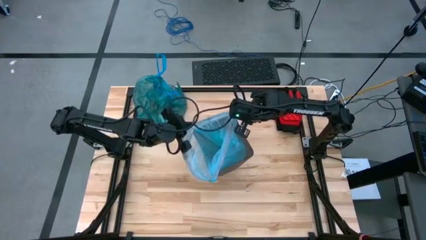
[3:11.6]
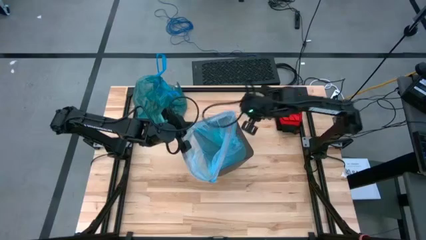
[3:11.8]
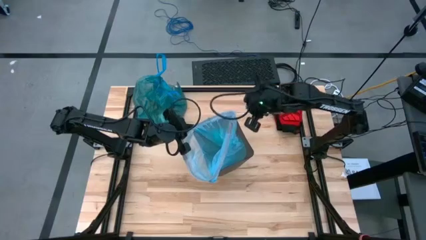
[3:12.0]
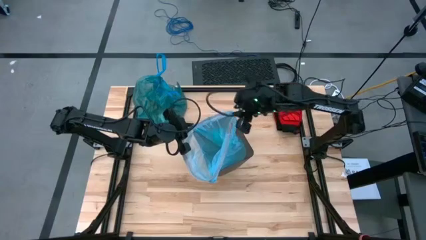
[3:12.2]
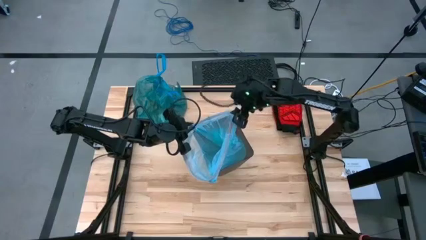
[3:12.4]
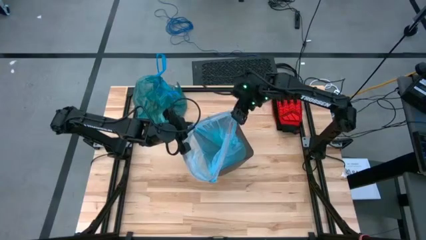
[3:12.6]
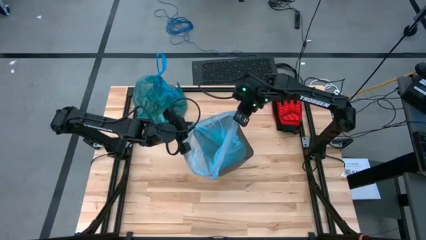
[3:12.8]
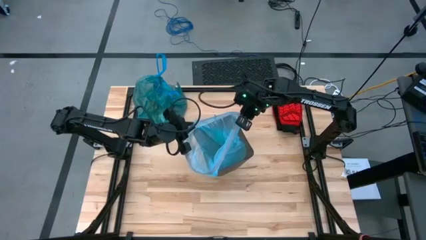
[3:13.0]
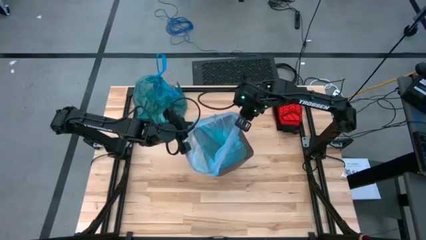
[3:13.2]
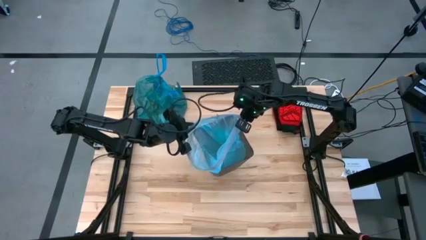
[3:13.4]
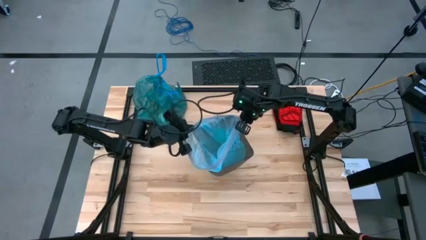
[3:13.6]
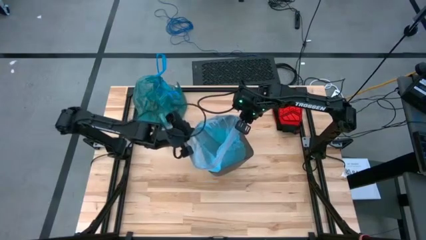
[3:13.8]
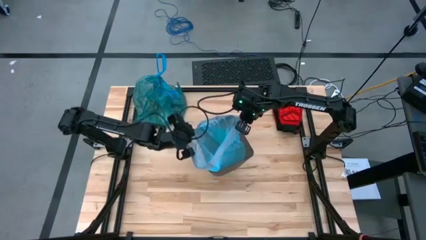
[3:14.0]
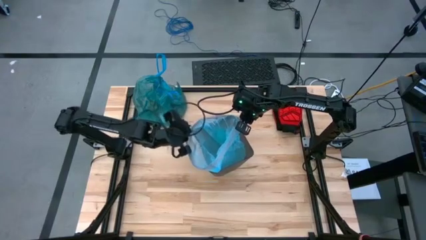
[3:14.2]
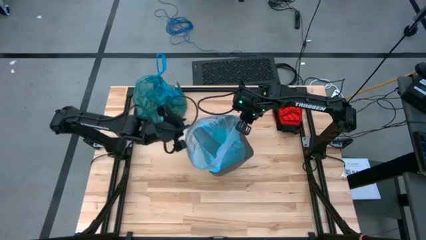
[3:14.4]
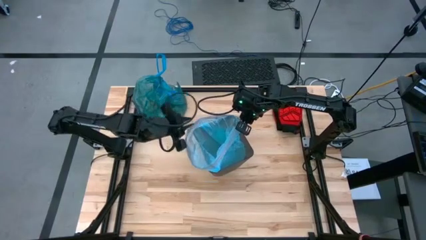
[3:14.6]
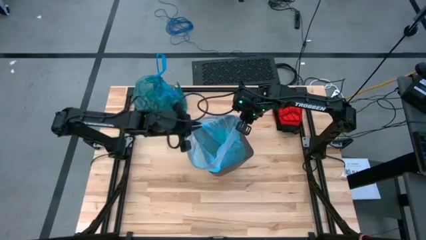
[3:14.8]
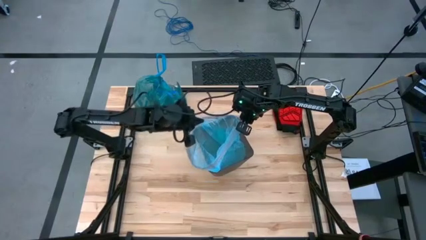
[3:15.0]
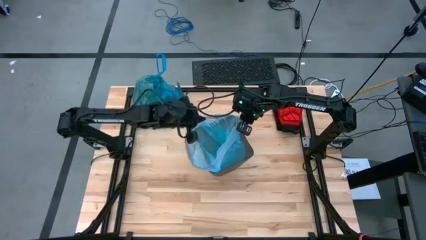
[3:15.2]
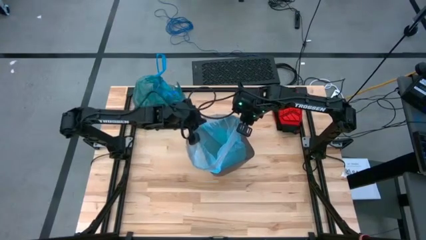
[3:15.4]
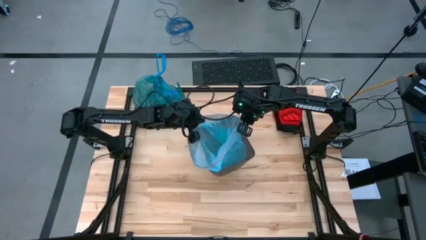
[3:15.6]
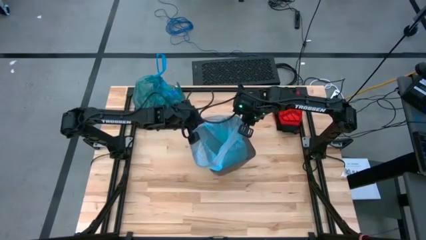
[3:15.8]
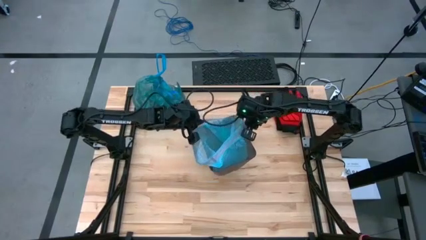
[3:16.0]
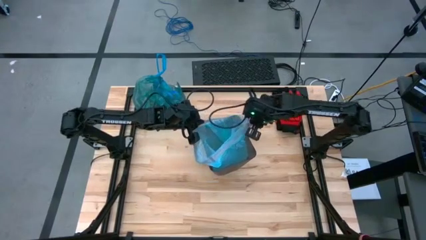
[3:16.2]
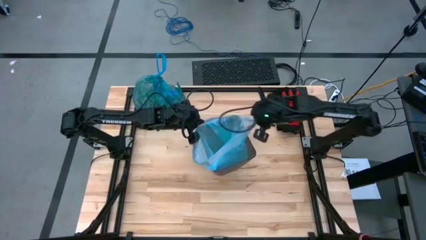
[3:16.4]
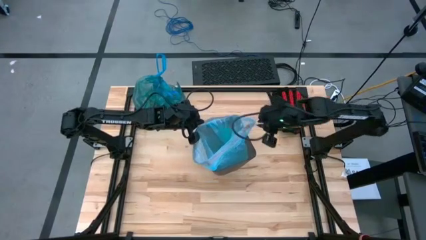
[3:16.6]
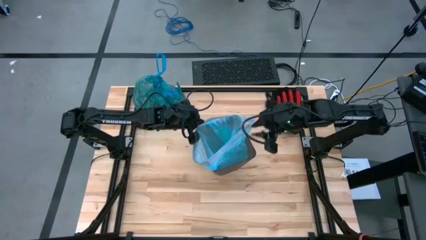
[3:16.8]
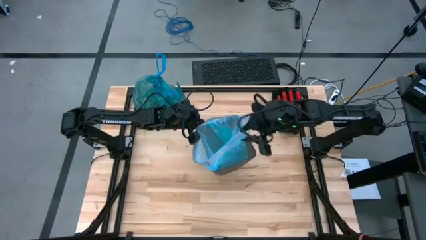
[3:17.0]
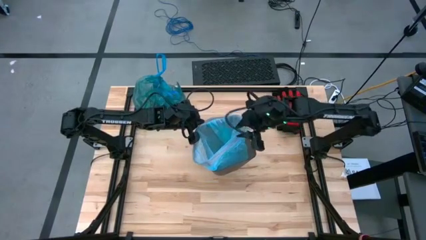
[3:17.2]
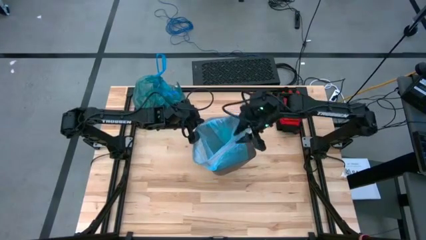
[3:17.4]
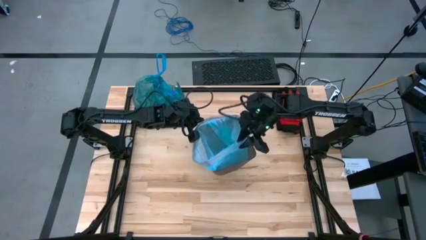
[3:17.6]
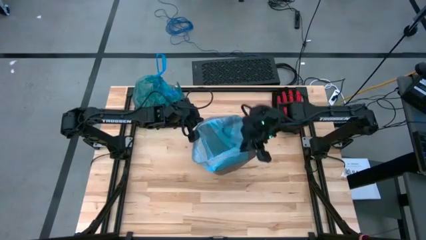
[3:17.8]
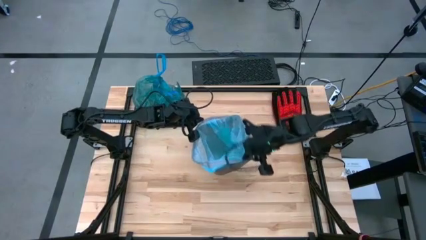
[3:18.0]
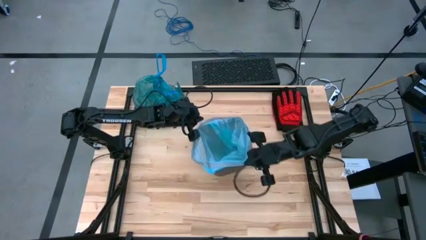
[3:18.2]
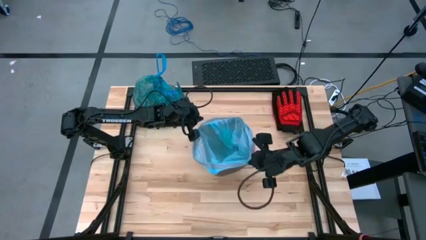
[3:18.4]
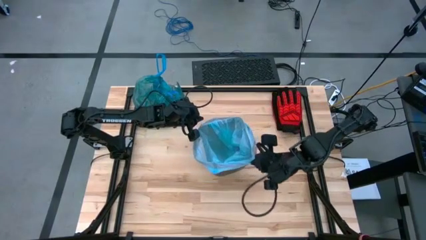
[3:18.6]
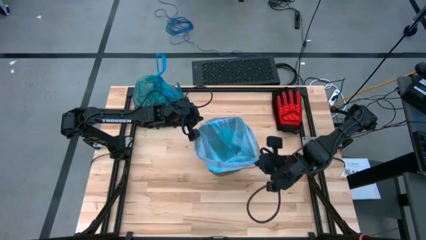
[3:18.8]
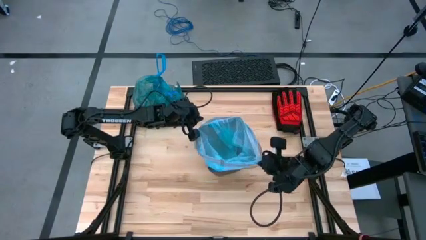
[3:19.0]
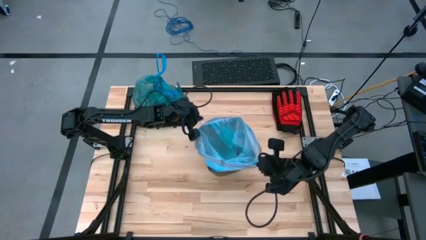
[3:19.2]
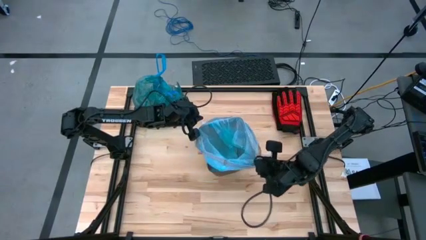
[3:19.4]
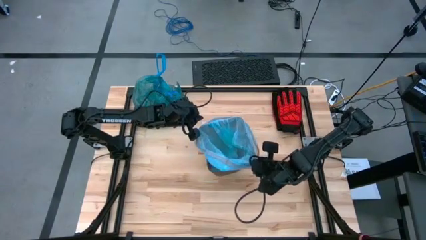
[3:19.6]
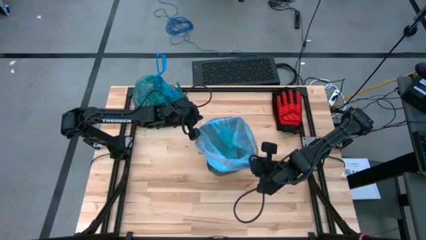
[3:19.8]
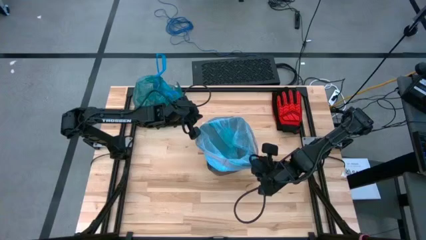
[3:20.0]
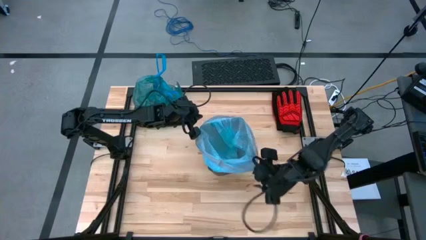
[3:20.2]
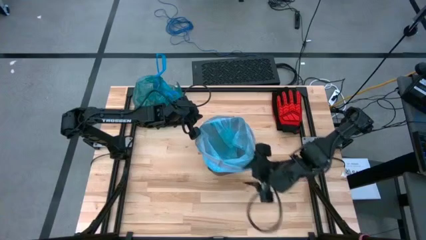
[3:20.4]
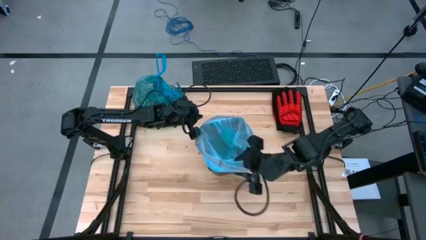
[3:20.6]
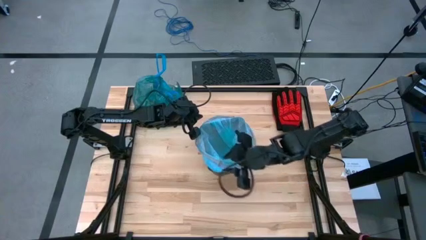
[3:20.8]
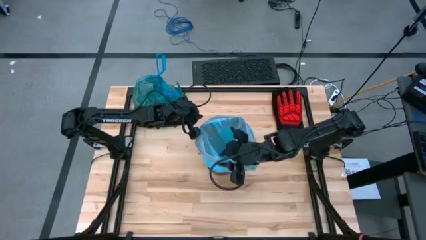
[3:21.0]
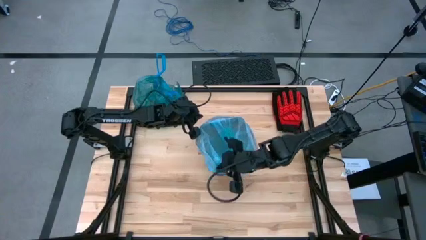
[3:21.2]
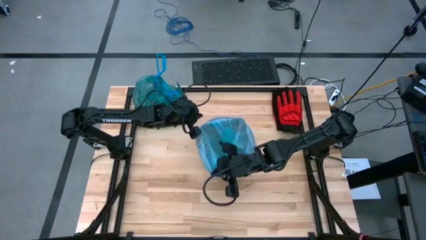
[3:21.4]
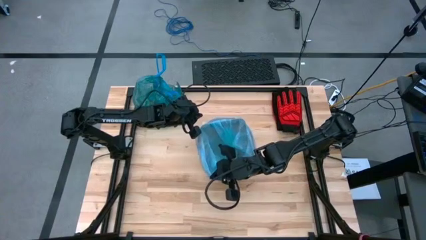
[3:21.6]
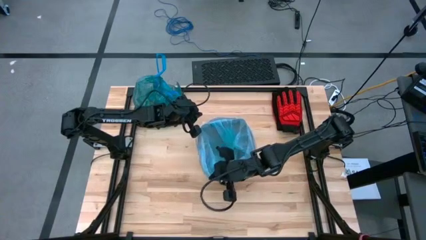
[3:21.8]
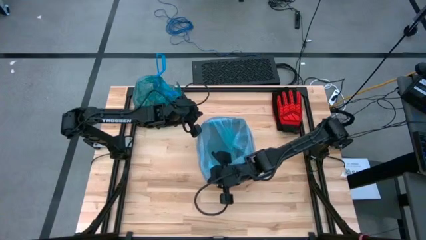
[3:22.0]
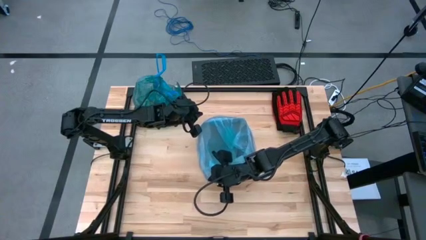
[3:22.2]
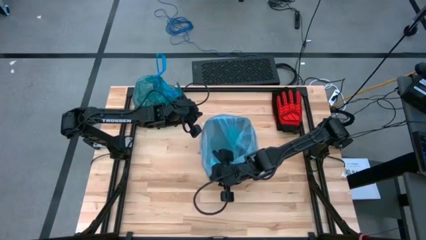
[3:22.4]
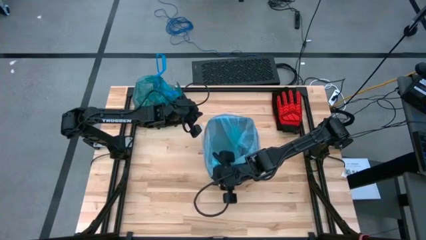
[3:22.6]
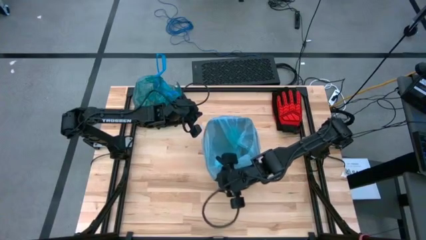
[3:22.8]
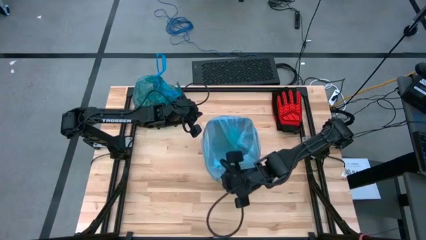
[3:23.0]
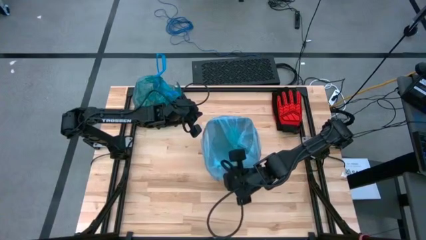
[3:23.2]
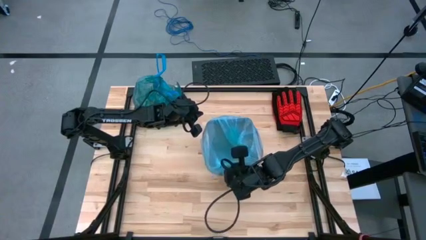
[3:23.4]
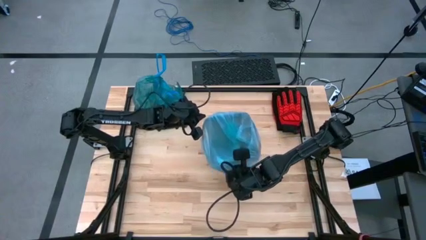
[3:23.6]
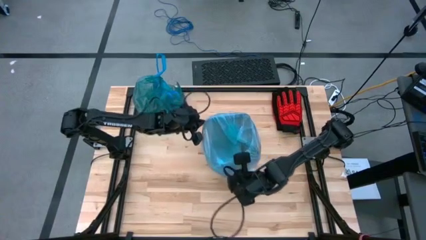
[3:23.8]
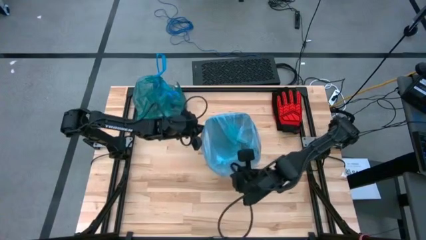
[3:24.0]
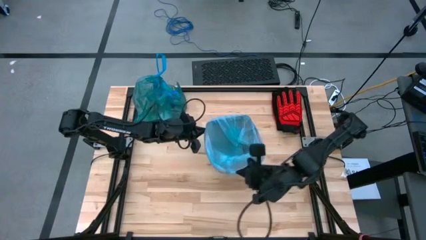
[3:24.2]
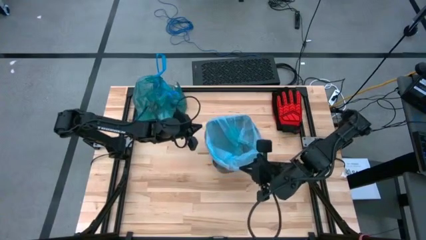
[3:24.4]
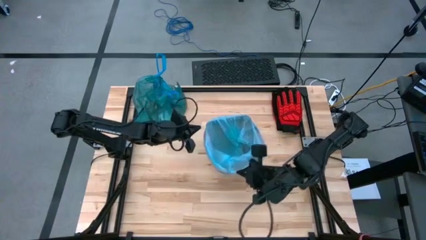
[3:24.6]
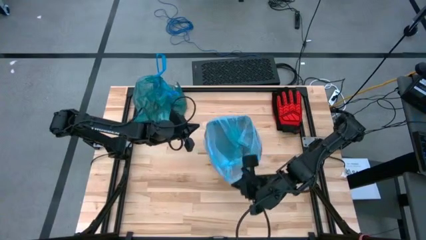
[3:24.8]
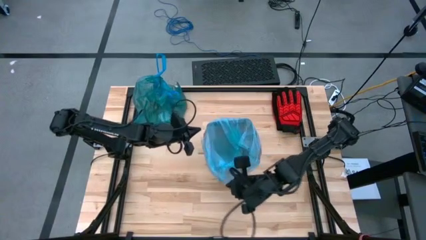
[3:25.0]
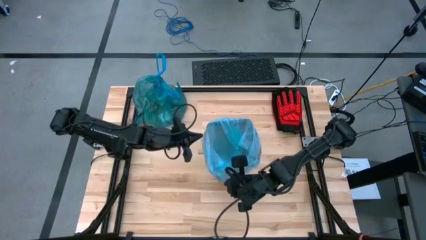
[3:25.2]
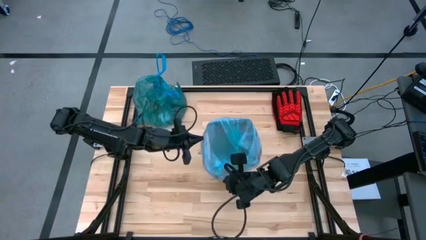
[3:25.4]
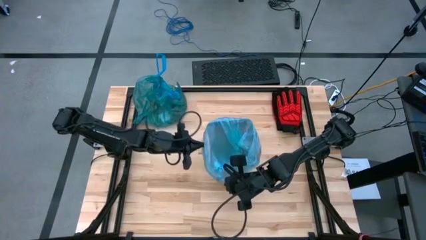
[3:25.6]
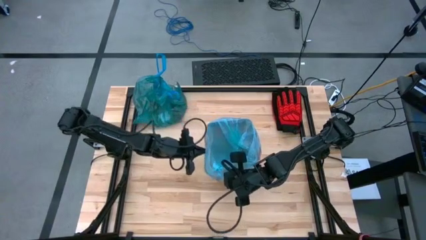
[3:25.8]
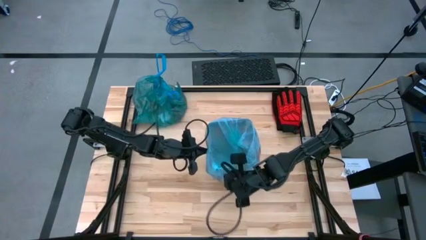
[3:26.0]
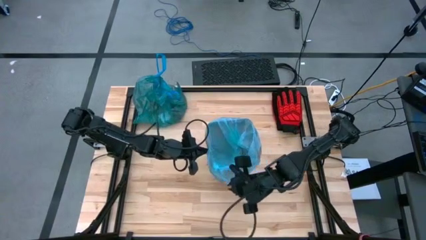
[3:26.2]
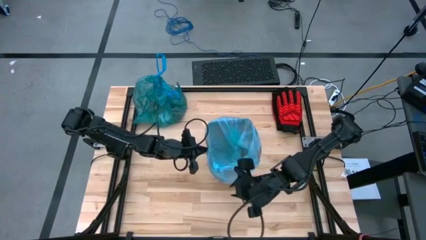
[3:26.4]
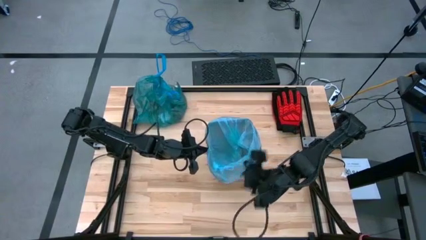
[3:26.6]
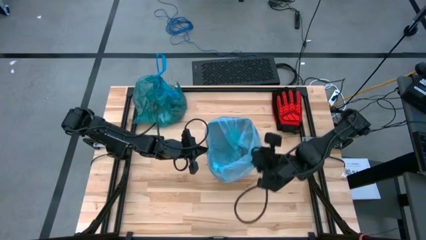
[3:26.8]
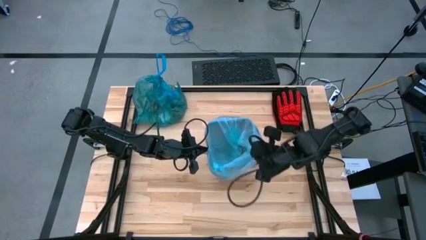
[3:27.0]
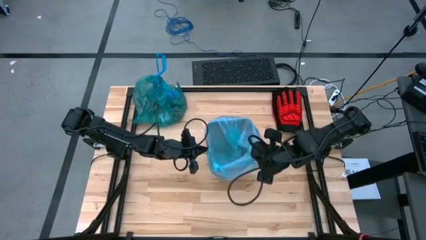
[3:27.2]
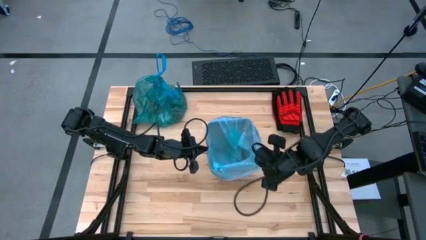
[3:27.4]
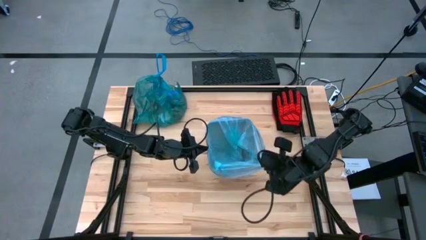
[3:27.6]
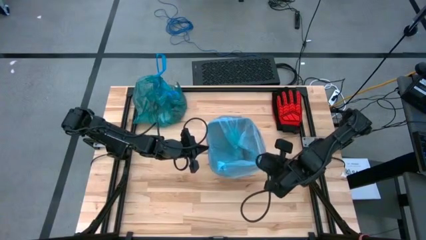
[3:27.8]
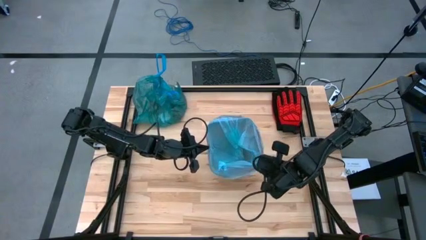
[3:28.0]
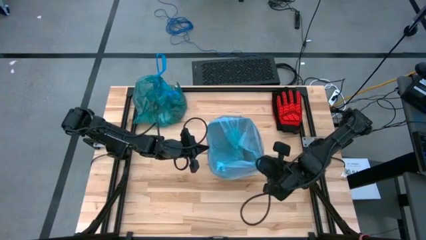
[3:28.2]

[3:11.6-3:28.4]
Task: place trash/remove bag and relplace
Insert the blue trash bag into the trash bin
